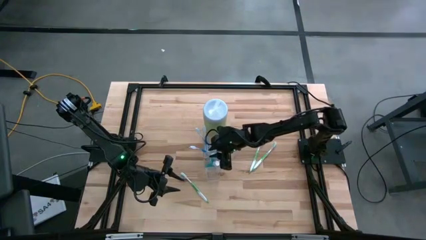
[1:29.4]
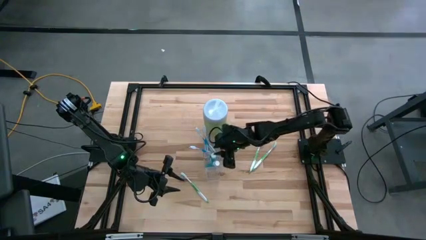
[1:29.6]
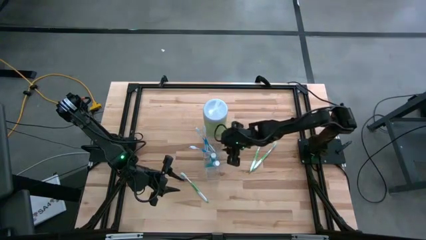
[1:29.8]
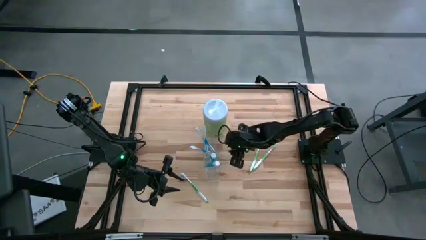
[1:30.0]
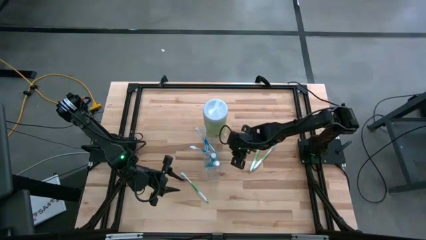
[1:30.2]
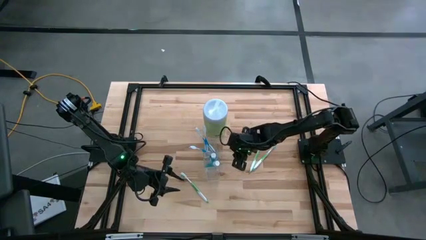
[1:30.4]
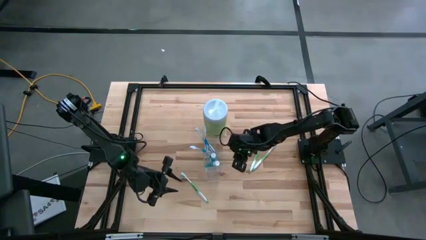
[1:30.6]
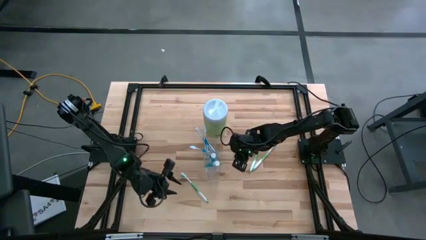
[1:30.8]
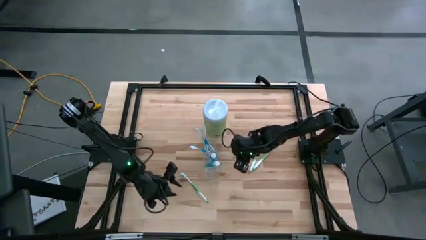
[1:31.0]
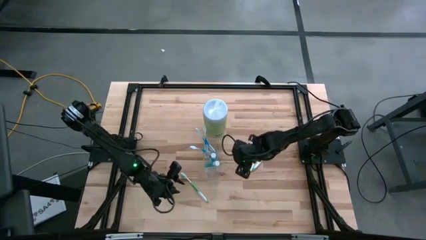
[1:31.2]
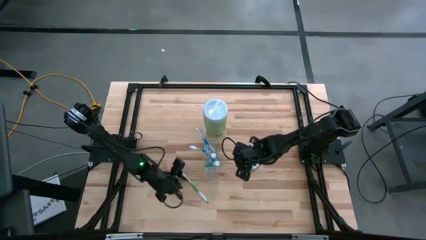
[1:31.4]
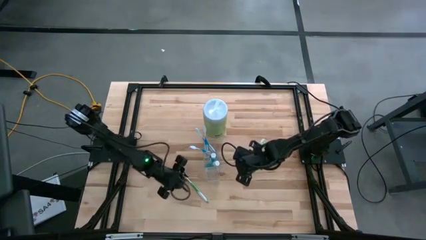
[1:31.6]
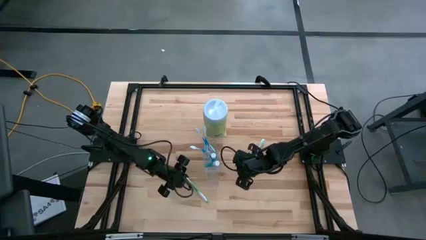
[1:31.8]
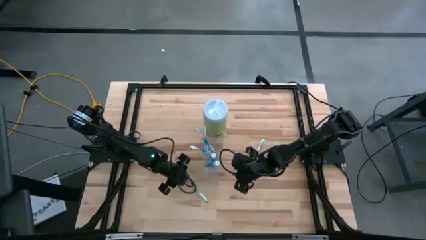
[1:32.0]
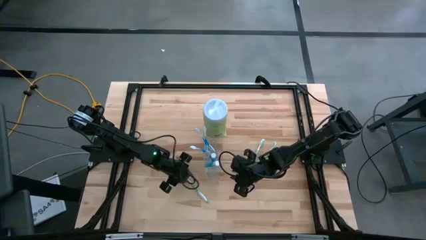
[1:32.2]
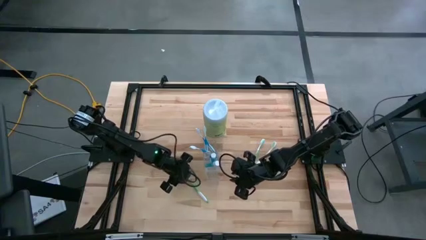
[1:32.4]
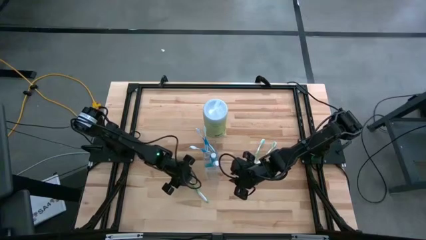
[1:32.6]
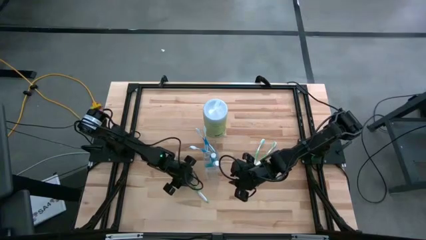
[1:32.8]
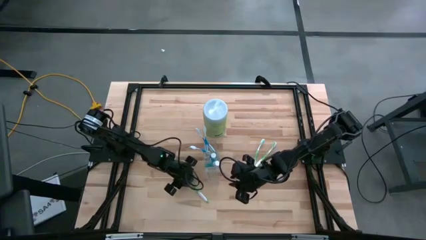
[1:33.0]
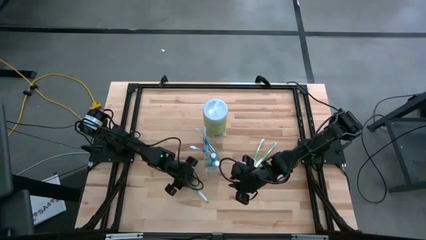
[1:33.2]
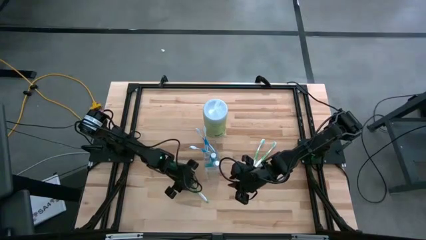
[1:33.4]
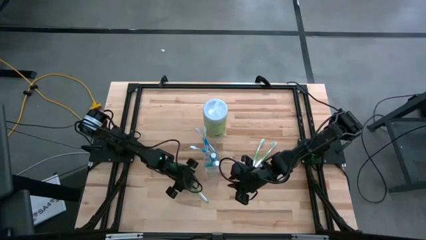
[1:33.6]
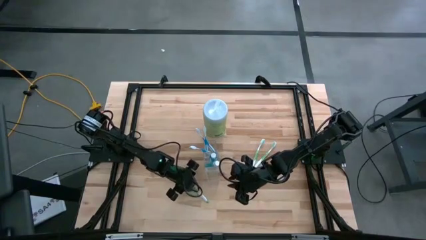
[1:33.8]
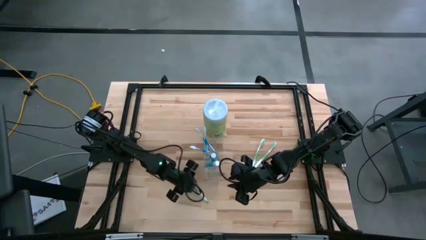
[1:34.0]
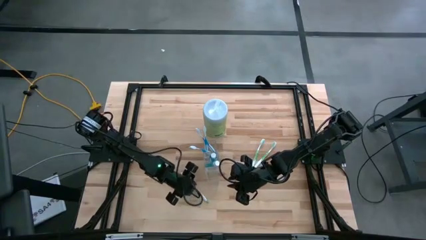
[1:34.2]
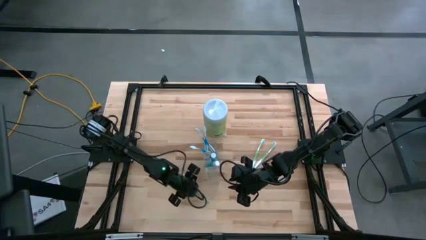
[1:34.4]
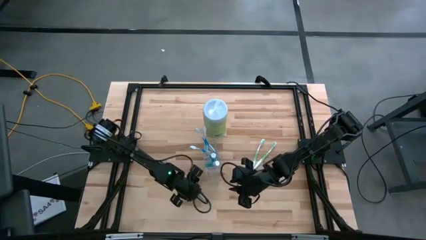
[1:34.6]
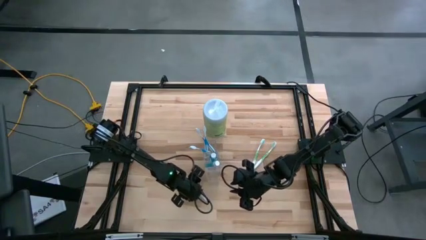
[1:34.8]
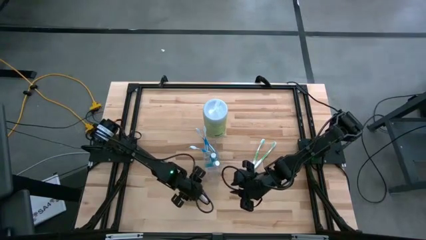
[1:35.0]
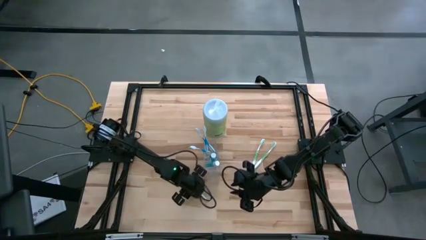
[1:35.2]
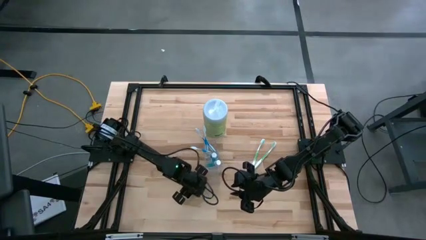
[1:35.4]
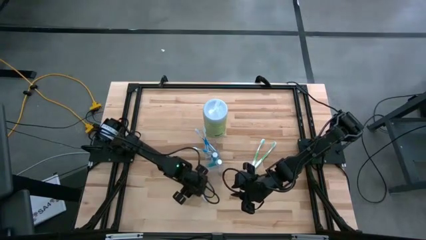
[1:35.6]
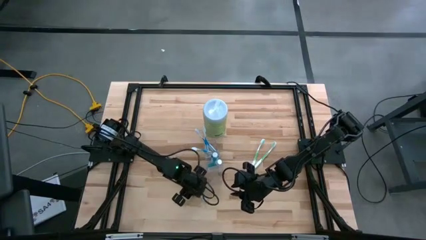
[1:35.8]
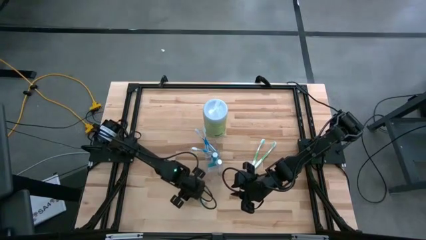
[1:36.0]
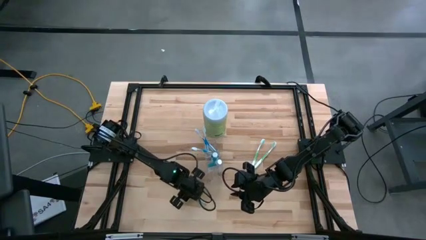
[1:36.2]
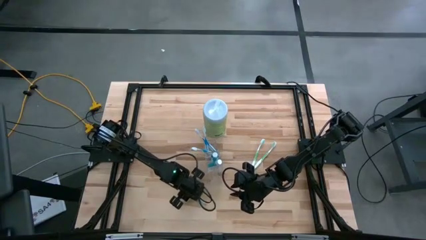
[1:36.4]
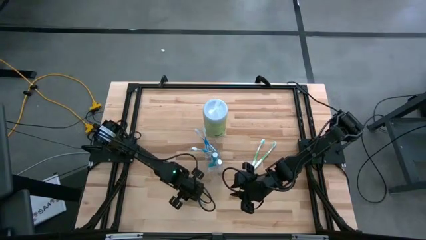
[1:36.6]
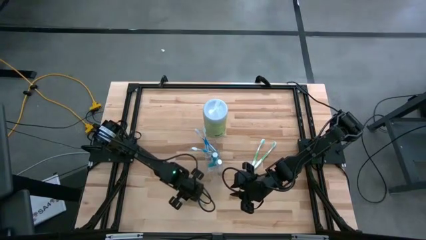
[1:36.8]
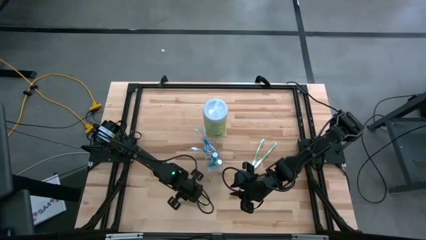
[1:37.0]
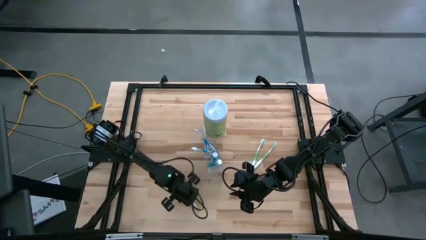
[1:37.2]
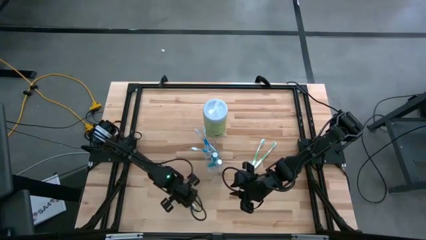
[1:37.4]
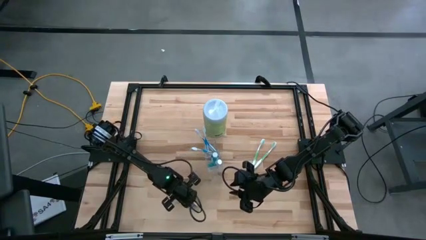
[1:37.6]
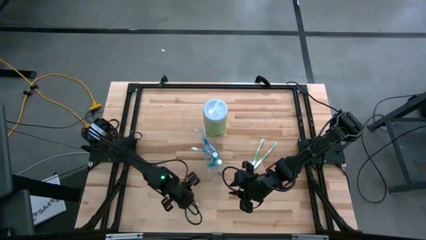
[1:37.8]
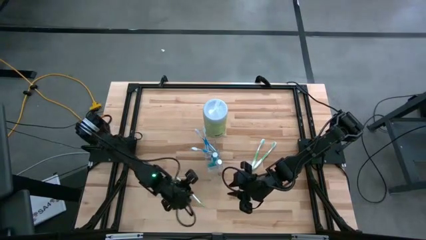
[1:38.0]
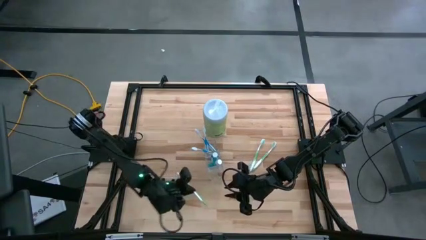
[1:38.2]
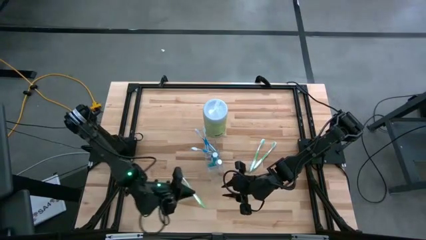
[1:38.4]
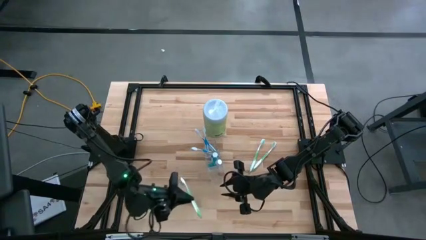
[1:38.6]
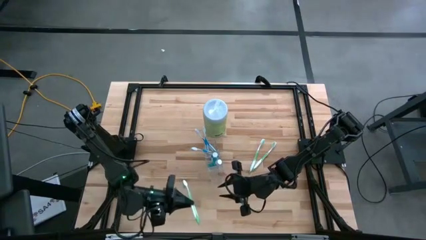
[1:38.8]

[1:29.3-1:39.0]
Task: Pick & Place toothbrushing station
Put the bottom green toothbrush into the transparent organizer

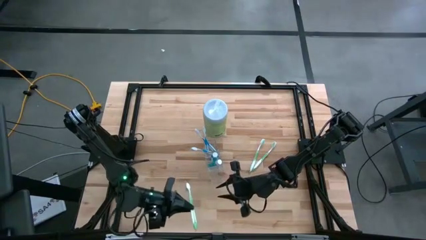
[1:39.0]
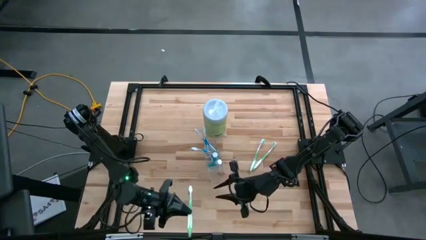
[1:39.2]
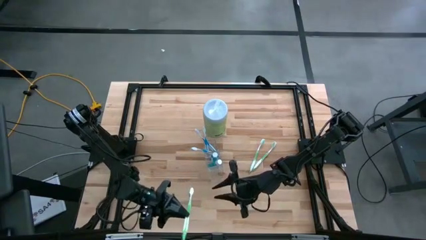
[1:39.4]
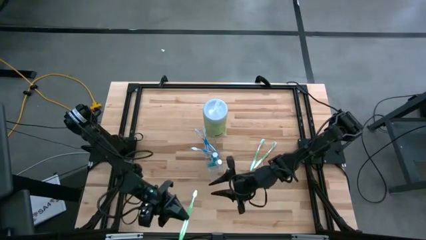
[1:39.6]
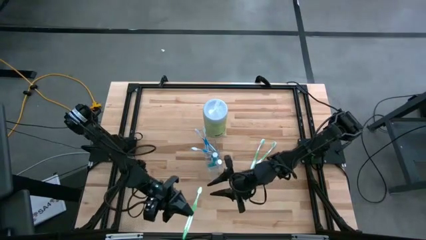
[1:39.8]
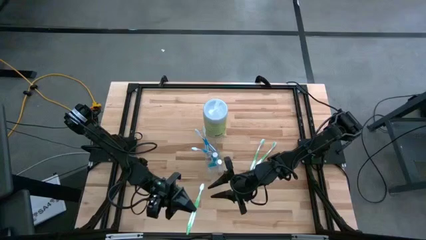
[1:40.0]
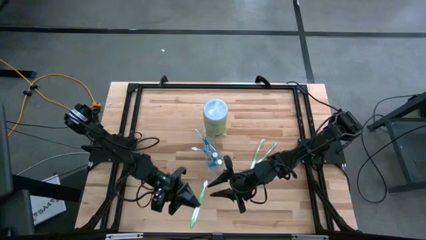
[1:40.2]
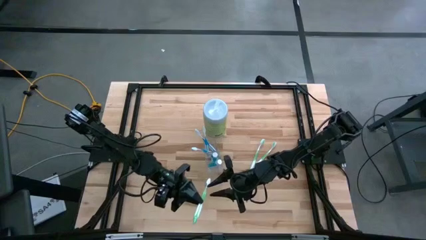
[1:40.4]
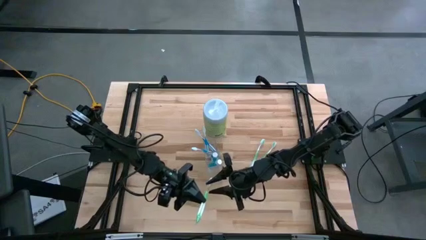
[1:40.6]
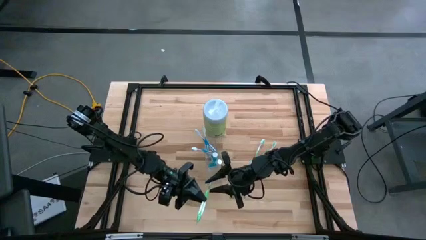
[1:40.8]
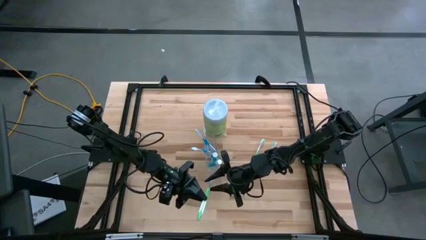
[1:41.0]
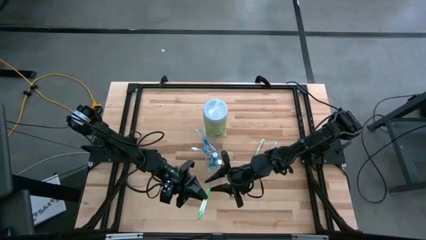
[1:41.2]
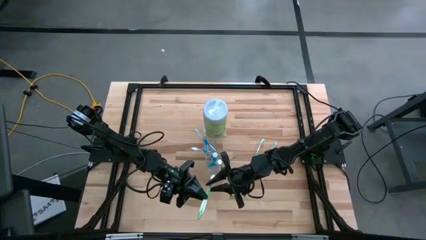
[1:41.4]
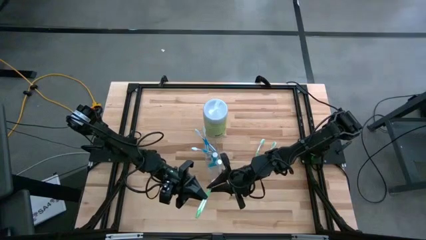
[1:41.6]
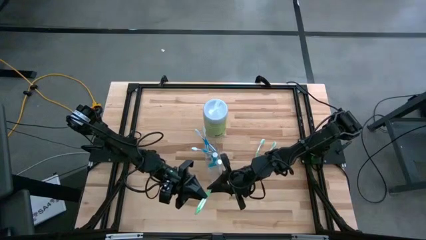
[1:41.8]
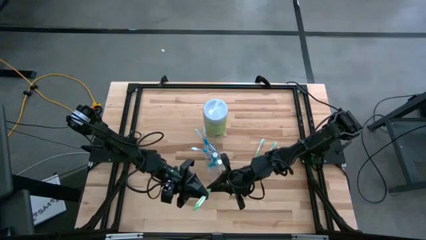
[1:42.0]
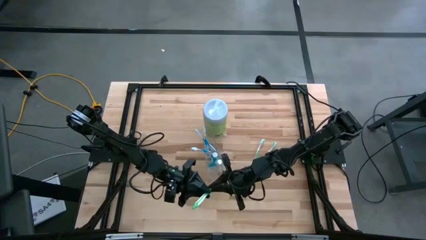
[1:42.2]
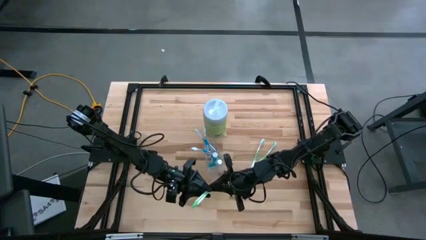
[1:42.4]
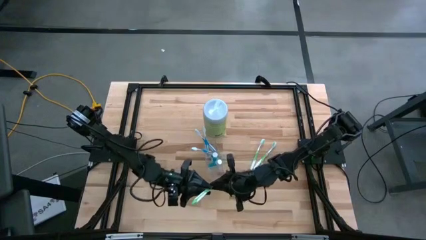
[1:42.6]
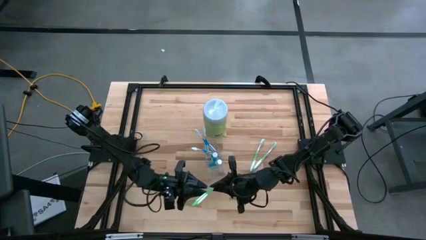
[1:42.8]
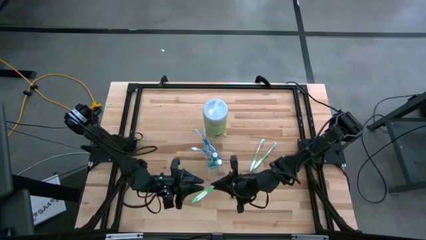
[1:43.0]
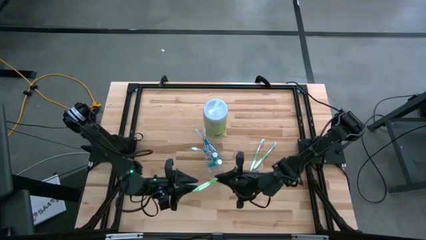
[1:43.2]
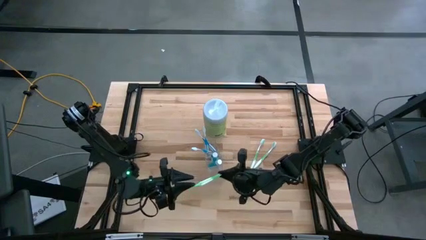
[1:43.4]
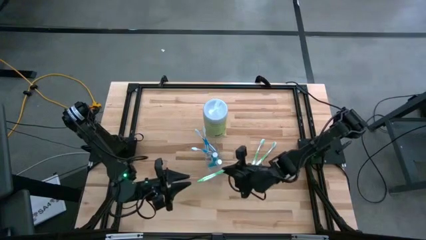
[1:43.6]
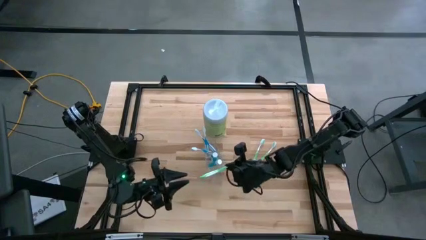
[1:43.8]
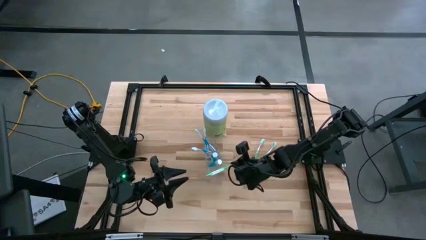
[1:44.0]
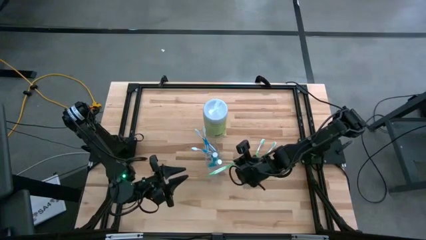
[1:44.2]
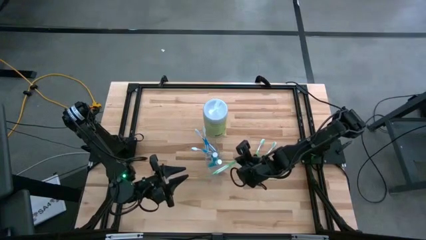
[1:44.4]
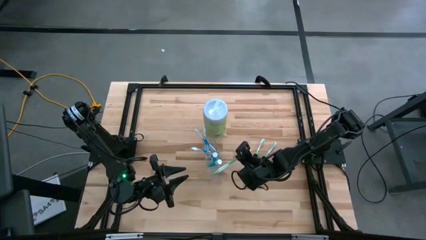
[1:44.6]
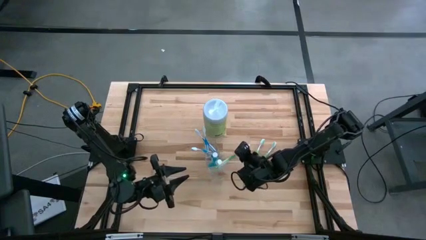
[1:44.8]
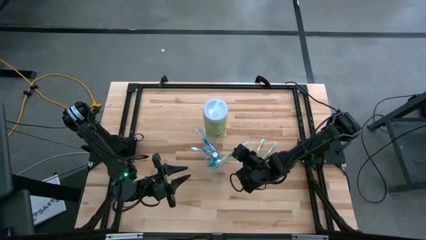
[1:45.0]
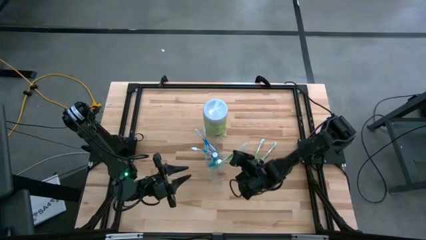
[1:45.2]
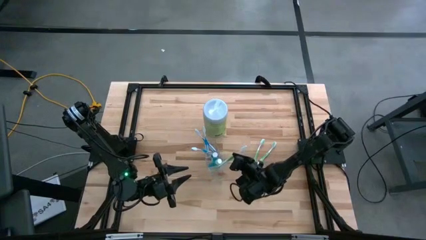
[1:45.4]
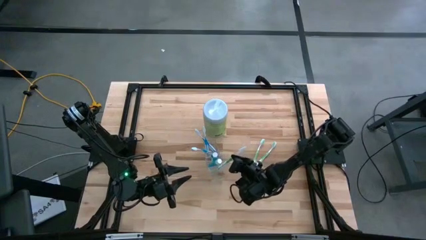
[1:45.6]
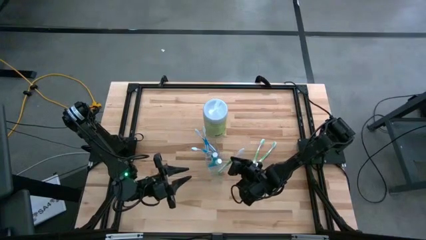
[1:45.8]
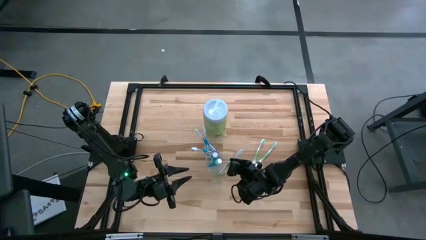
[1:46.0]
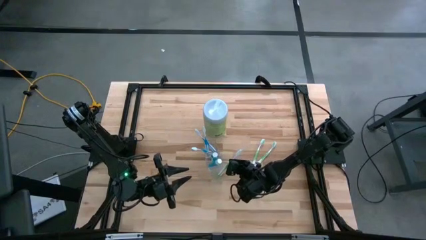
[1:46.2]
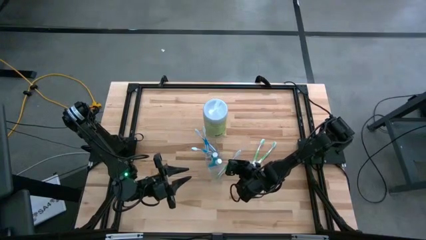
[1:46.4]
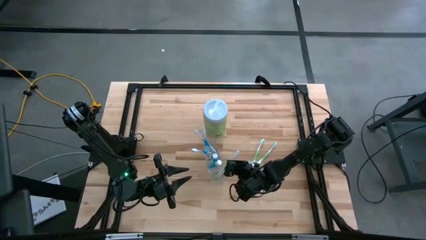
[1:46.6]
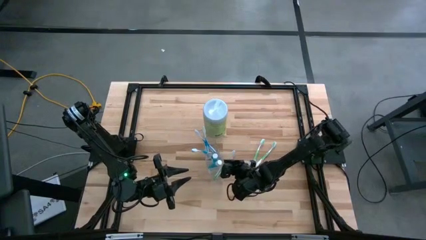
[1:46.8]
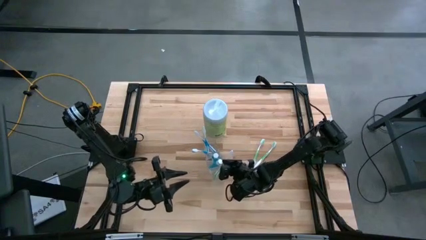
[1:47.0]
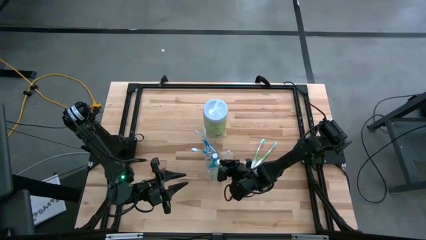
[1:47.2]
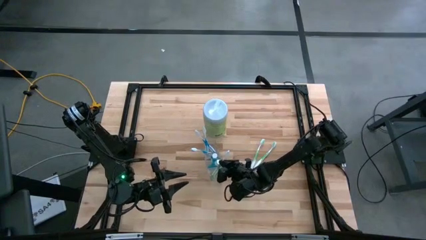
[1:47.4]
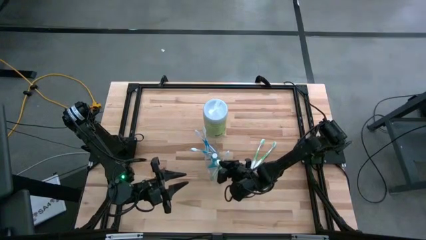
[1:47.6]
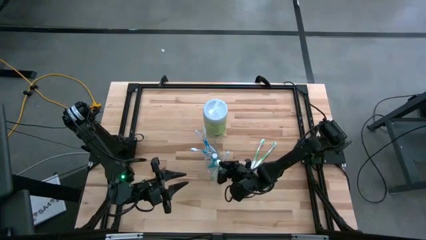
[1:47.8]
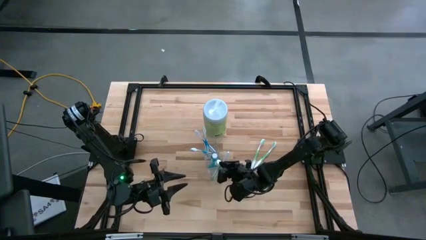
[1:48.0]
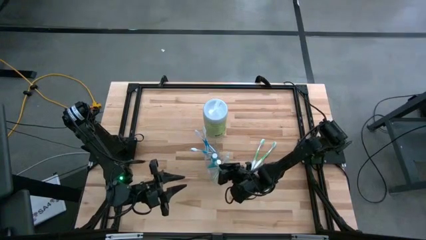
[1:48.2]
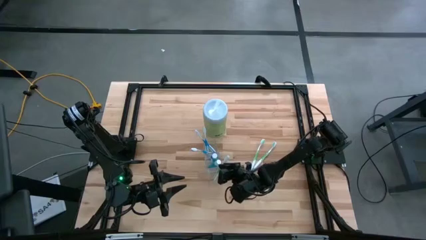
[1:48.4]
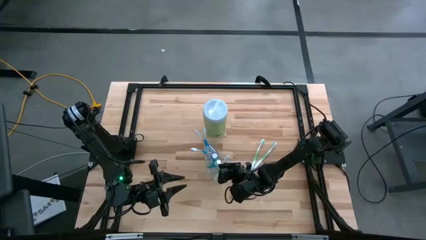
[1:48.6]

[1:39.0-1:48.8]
Put the bottom green toothbrush into the transparent organizer
